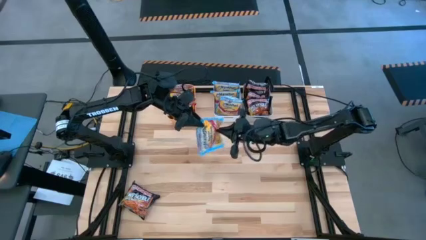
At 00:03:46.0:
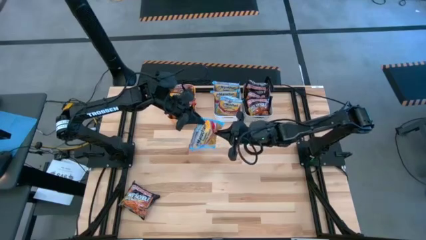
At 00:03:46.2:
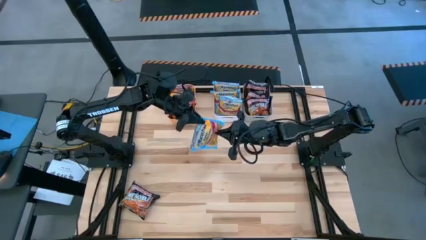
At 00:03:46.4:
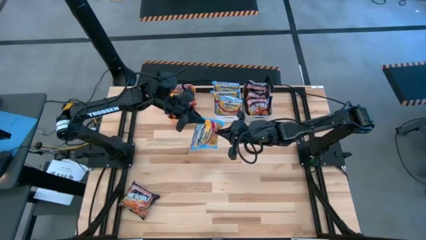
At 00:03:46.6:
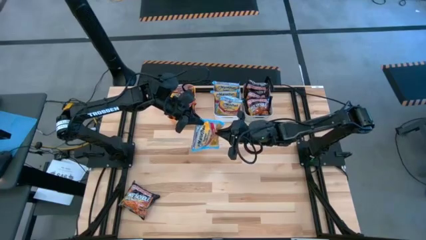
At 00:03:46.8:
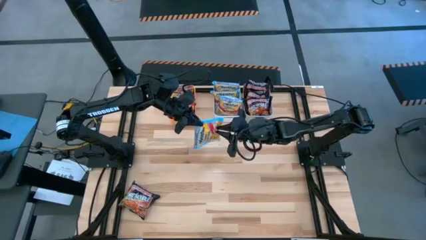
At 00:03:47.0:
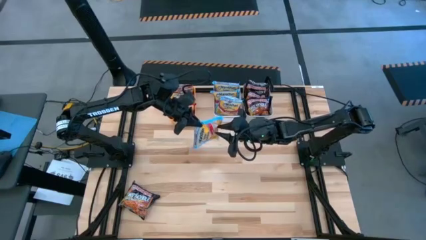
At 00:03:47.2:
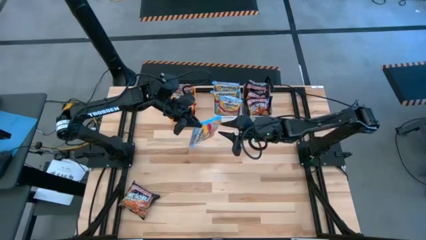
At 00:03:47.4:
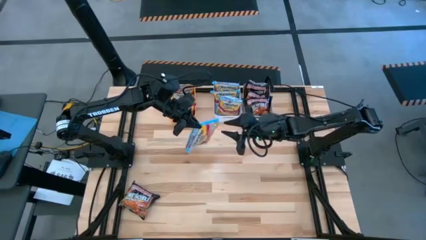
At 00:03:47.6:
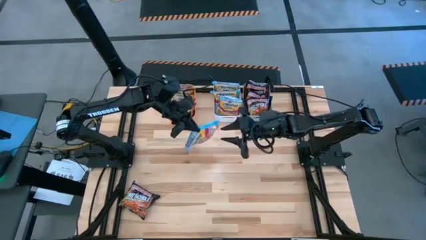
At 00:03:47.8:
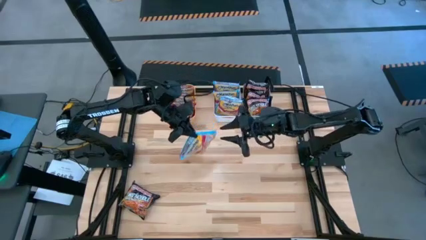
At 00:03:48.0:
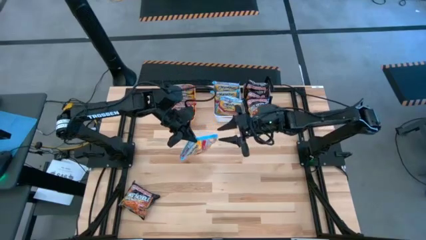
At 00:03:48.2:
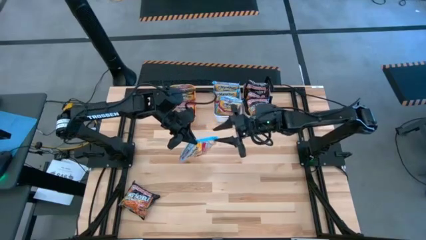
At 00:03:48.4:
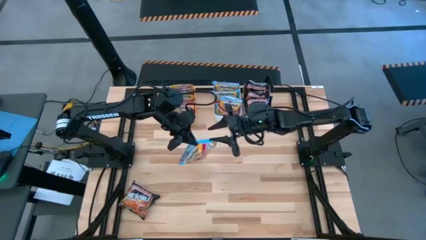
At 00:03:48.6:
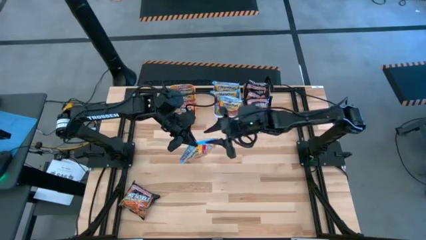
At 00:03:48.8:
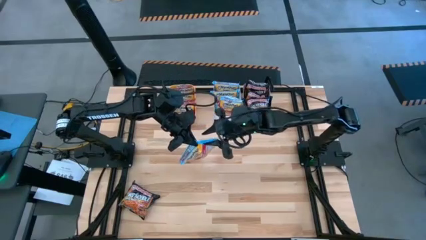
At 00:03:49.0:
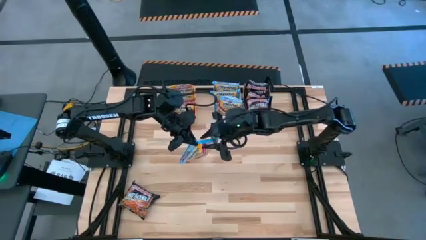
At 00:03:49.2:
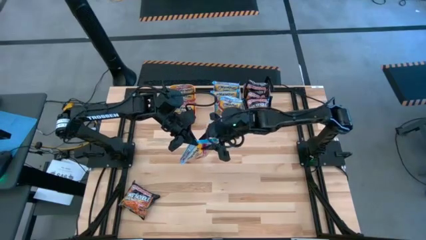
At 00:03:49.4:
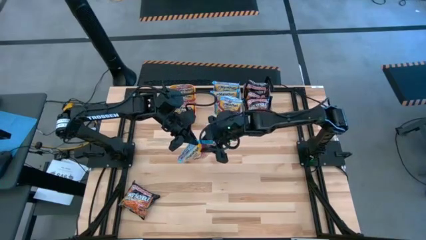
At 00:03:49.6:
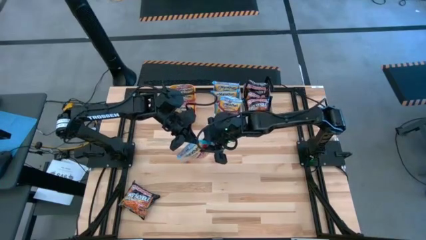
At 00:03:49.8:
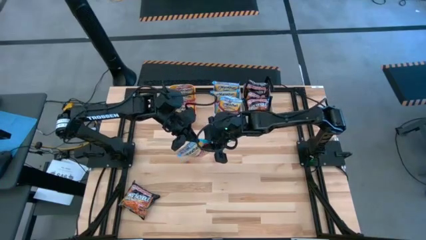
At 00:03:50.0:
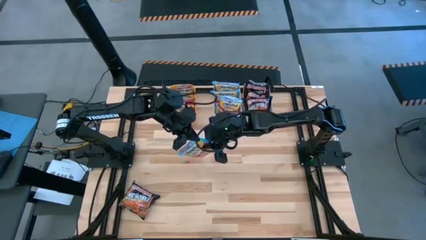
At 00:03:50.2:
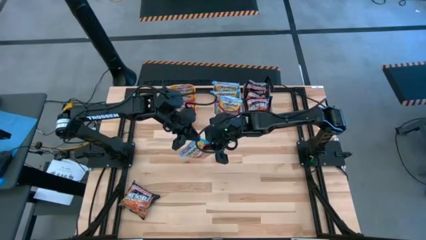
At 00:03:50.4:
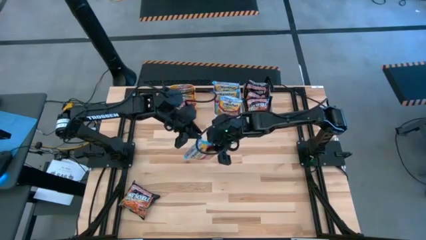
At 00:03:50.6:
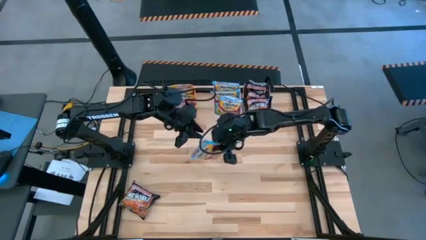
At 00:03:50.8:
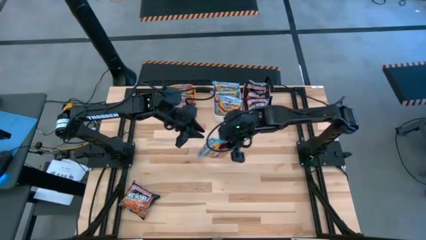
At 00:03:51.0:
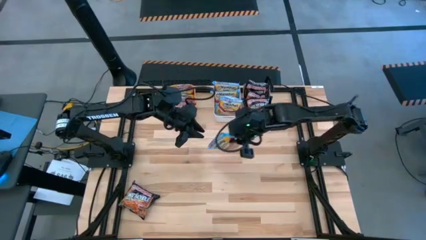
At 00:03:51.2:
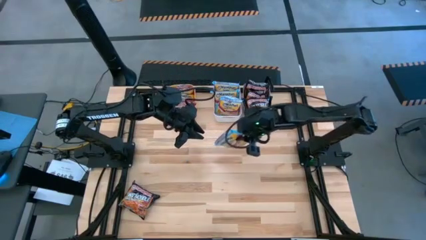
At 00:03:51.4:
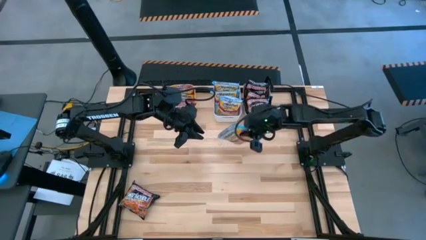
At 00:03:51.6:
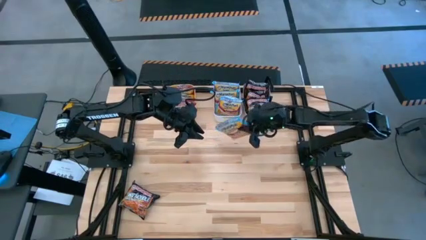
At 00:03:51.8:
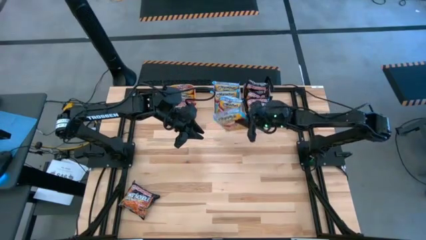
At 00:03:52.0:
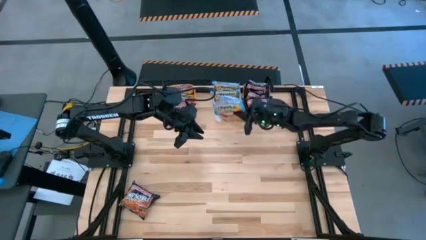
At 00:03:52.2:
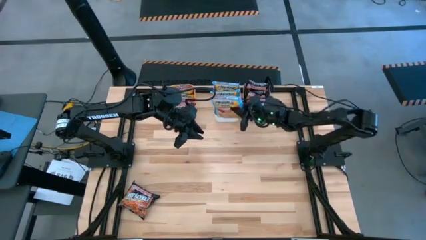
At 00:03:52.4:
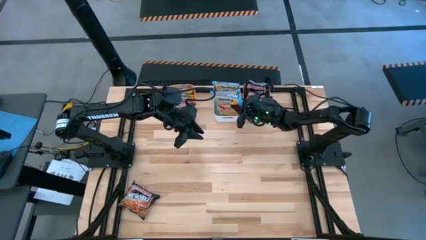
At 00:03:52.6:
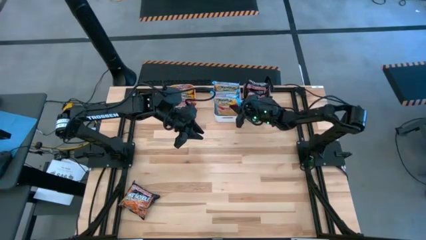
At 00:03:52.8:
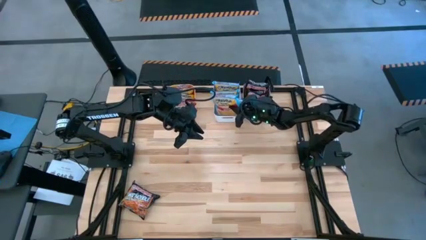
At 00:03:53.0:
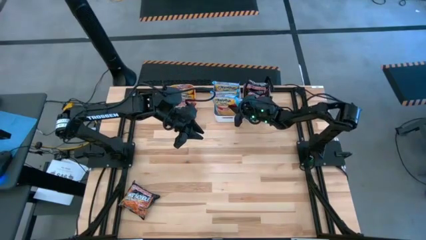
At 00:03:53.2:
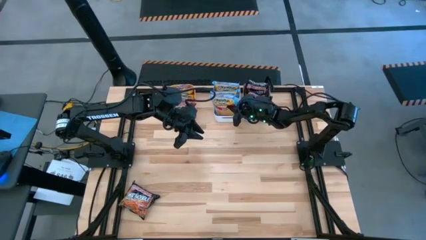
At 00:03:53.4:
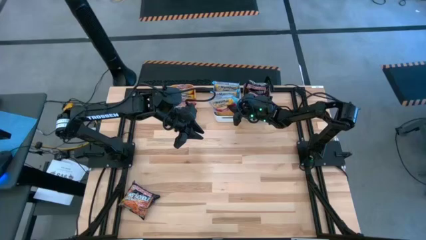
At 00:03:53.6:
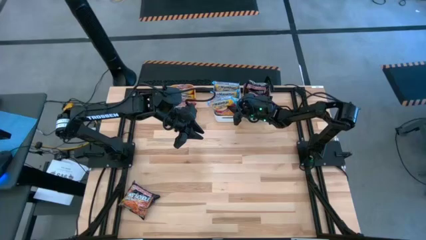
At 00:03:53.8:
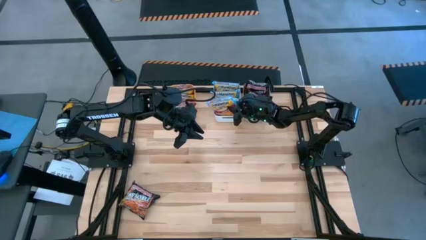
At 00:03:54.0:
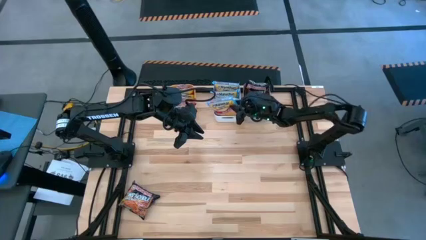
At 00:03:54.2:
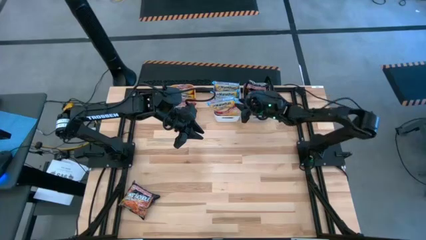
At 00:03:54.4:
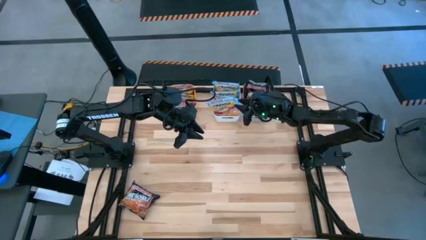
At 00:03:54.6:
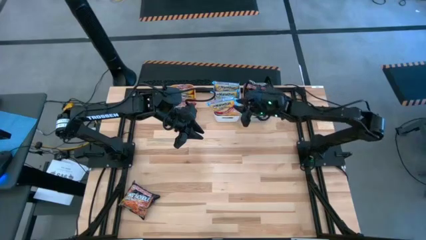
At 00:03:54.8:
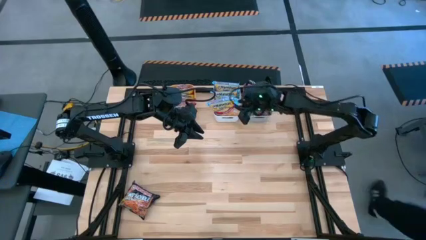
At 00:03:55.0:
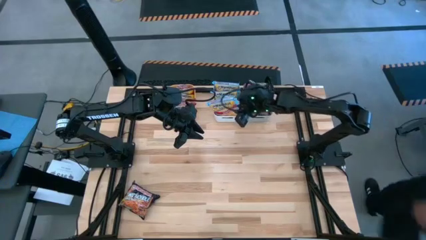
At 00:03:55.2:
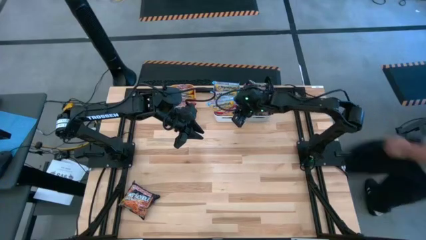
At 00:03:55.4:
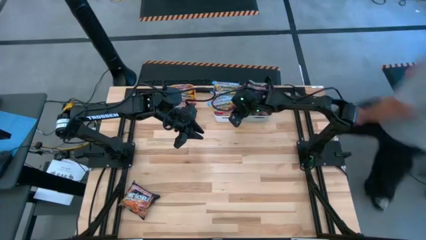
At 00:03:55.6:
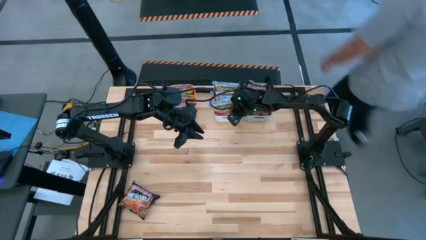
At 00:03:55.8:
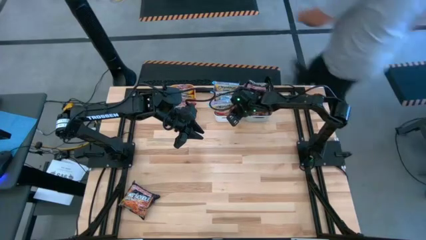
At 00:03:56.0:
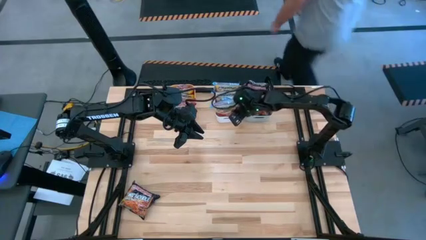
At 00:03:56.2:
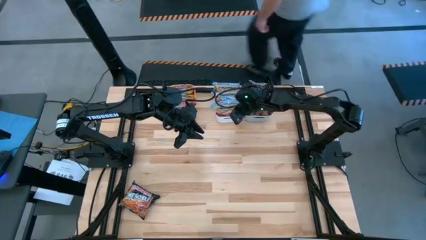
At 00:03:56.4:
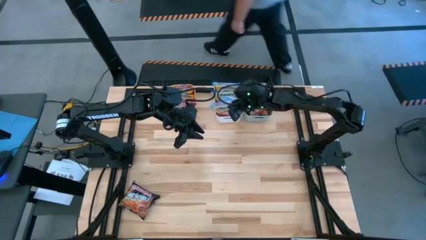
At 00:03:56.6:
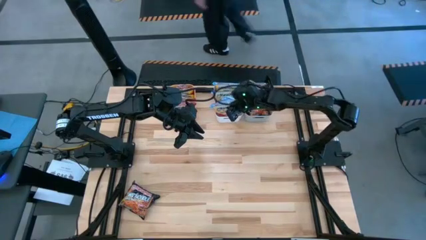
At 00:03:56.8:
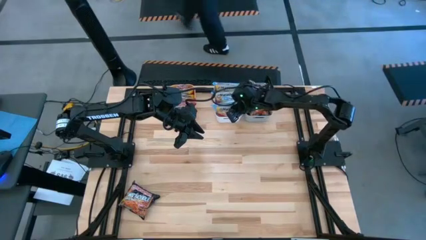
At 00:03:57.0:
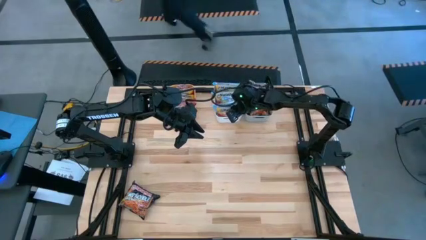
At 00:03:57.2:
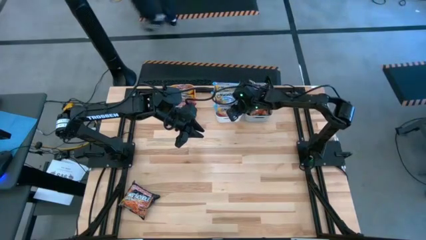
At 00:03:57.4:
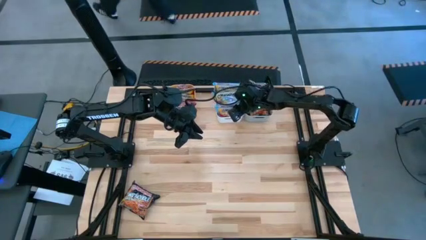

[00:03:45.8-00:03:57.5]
Task: Sort Maruchan noodles
Put the blue noodle pack into the white bin

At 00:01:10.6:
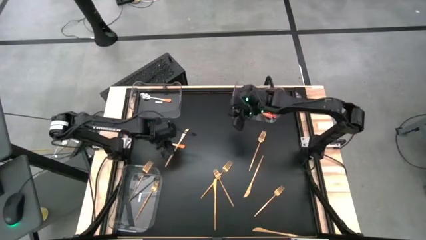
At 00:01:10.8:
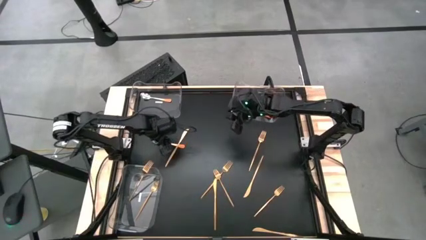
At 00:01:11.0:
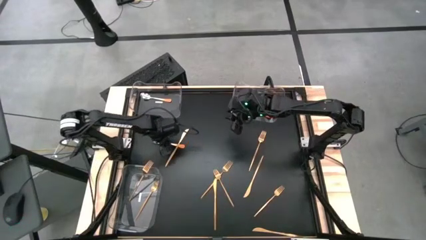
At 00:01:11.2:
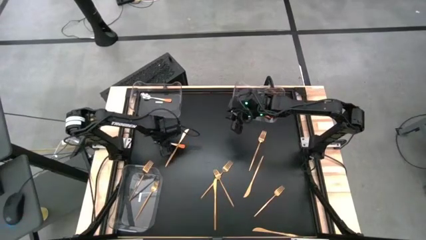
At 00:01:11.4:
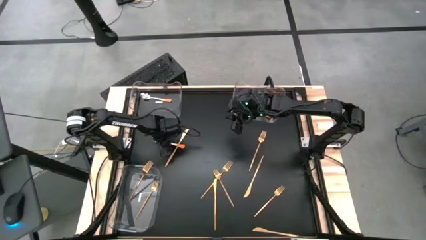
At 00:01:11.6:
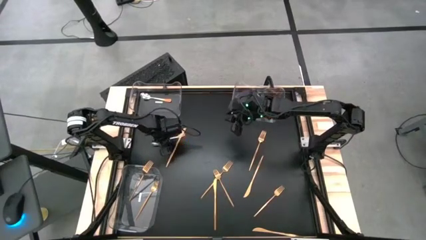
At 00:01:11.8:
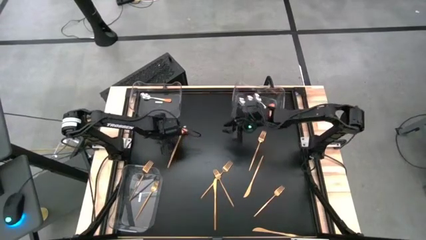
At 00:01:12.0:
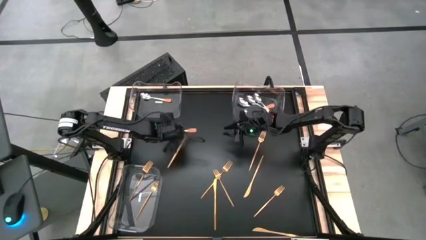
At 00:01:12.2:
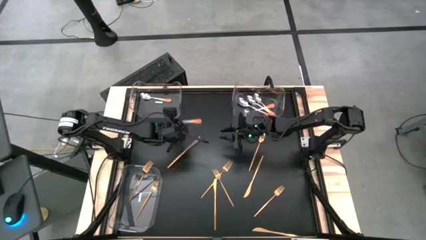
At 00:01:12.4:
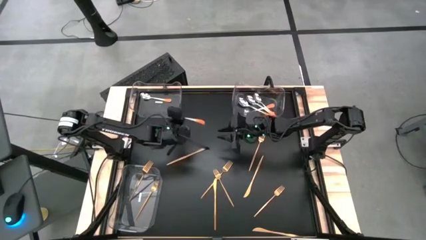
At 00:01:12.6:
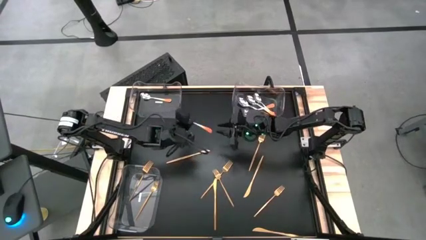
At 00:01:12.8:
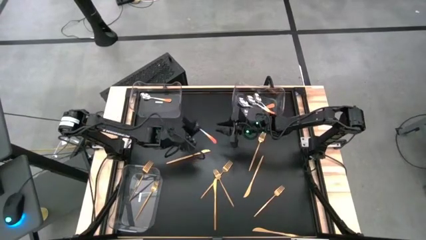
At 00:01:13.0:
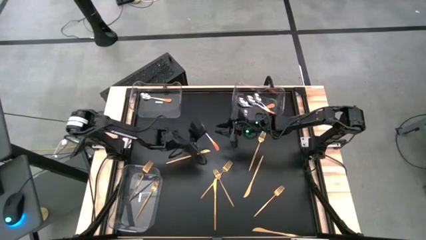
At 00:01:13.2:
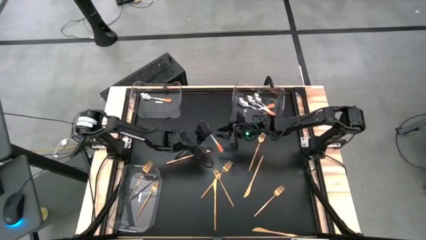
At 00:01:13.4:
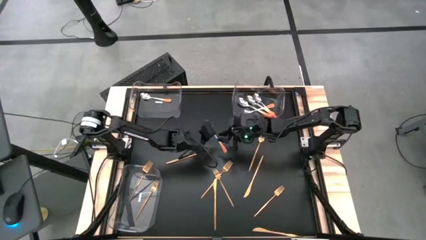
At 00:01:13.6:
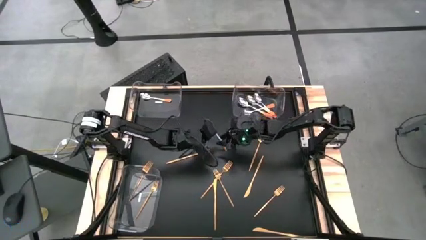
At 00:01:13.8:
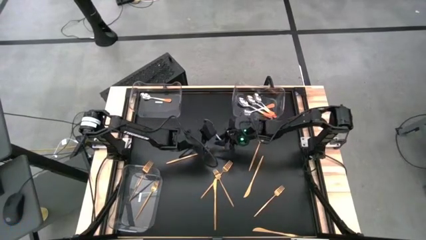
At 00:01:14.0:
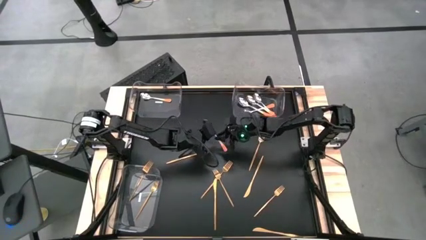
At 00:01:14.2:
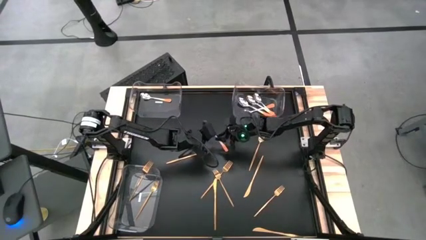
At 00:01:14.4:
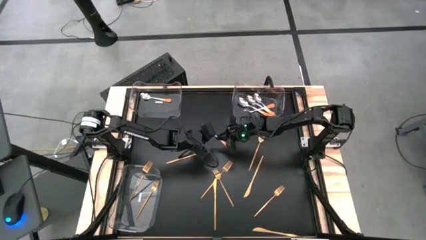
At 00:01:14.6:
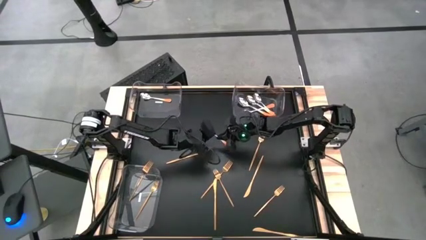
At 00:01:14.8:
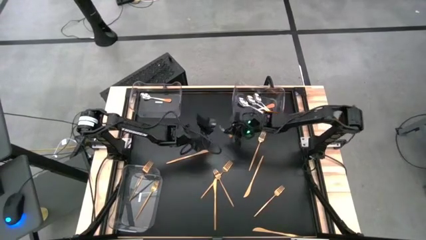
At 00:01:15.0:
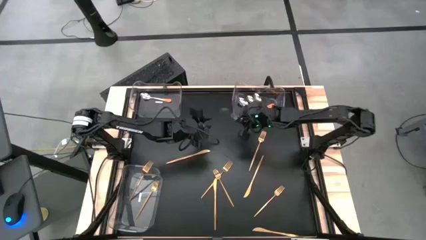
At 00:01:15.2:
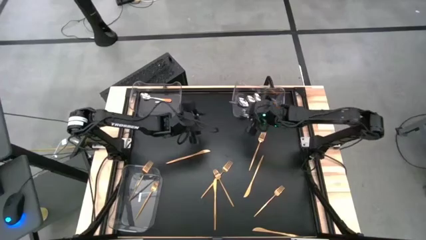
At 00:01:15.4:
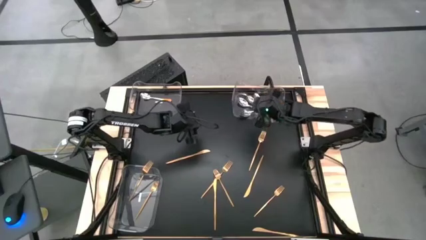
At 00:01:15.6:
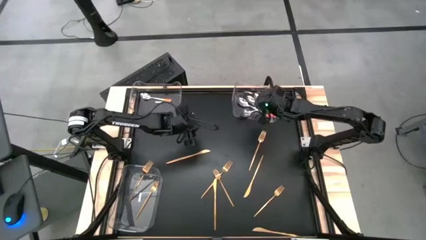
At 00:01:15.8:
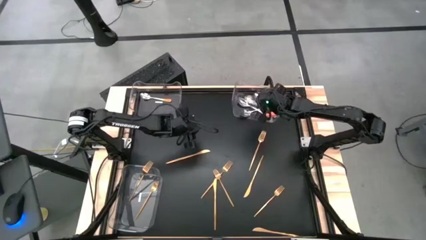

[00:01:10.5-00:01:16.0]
Task: Sort silverware by color (type)
Put the silver and orange spoon into the top right transparent bin
